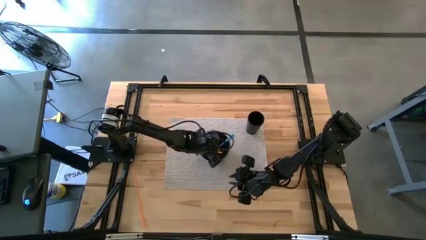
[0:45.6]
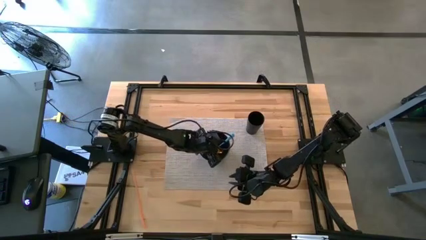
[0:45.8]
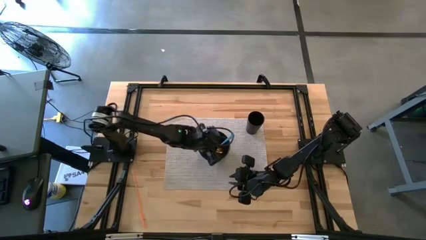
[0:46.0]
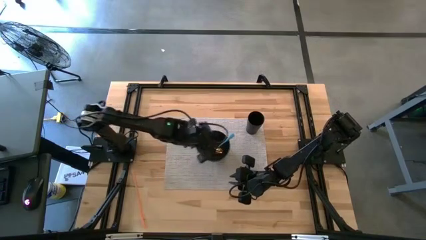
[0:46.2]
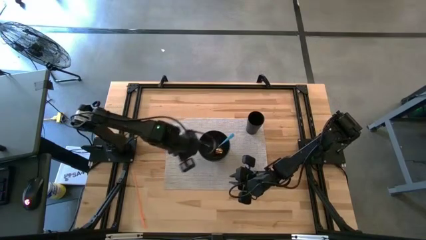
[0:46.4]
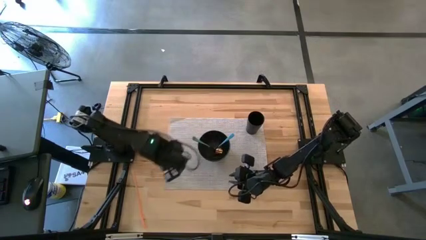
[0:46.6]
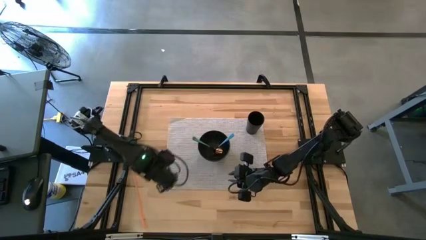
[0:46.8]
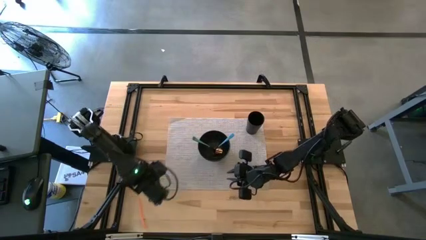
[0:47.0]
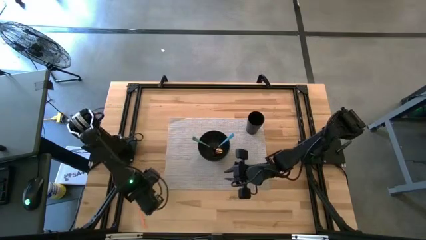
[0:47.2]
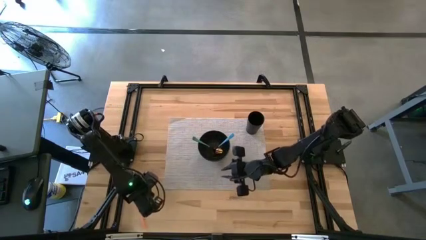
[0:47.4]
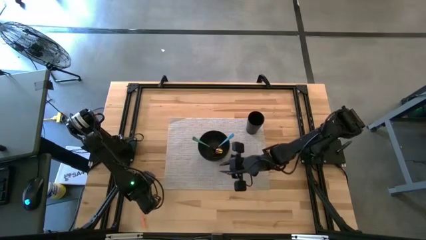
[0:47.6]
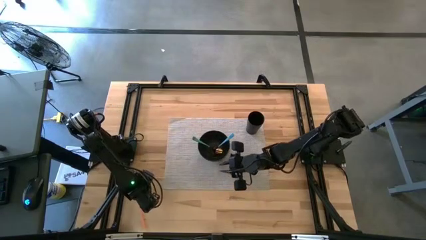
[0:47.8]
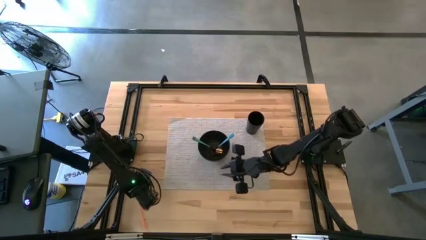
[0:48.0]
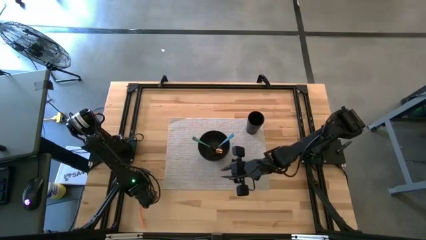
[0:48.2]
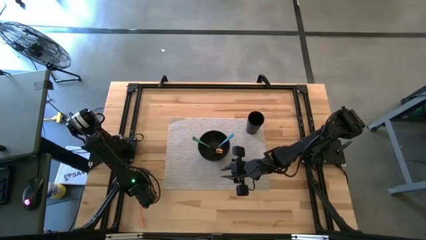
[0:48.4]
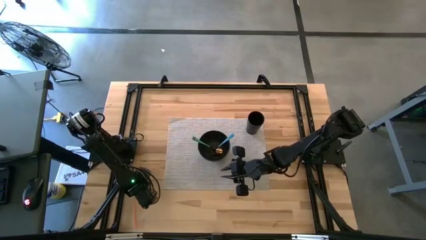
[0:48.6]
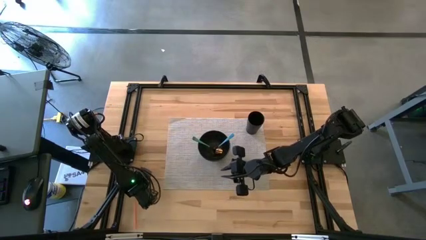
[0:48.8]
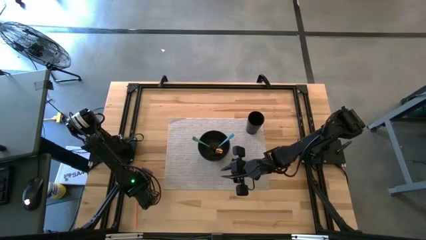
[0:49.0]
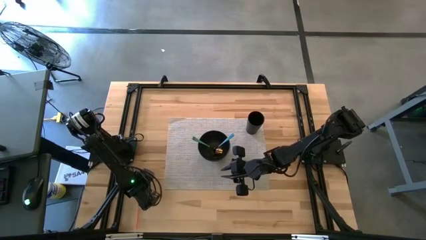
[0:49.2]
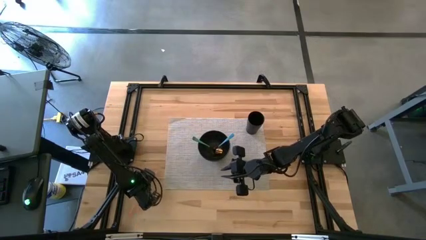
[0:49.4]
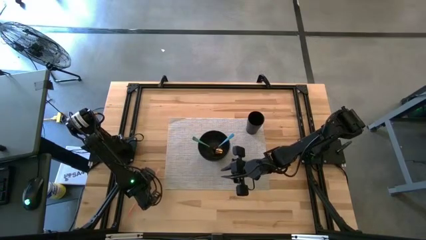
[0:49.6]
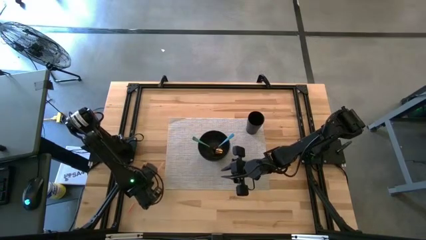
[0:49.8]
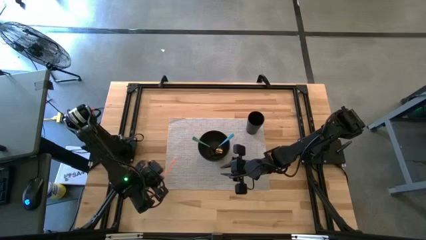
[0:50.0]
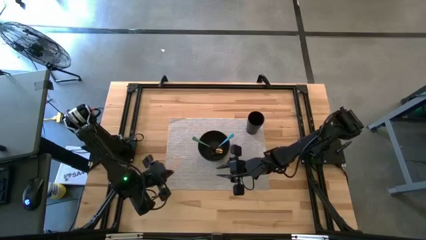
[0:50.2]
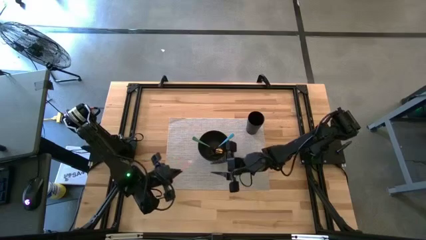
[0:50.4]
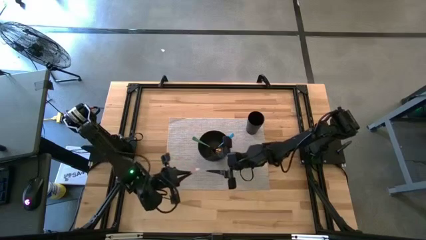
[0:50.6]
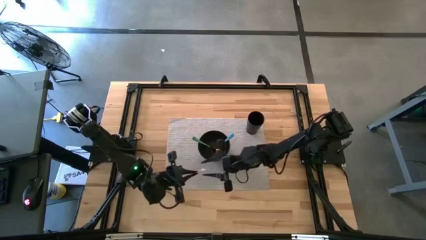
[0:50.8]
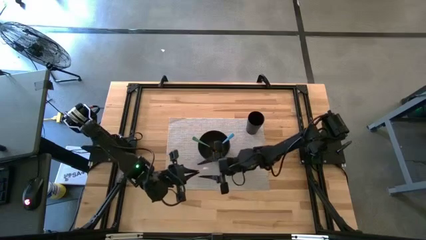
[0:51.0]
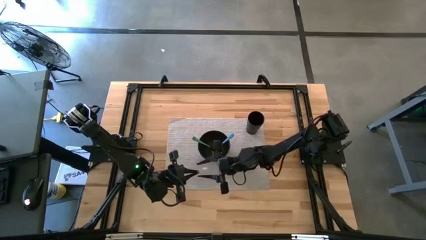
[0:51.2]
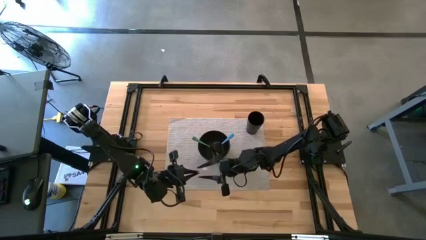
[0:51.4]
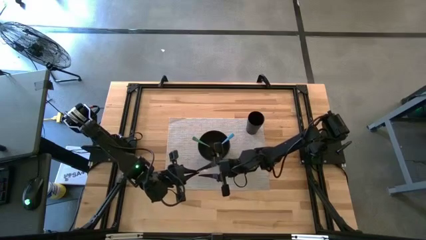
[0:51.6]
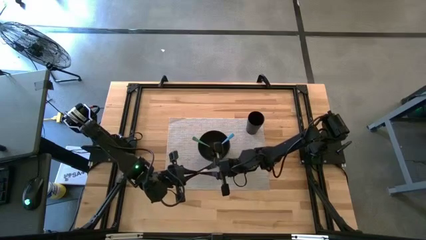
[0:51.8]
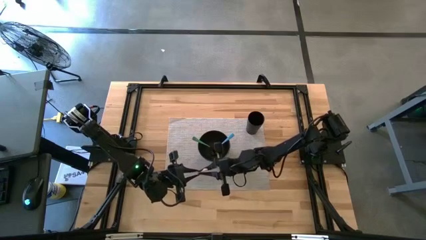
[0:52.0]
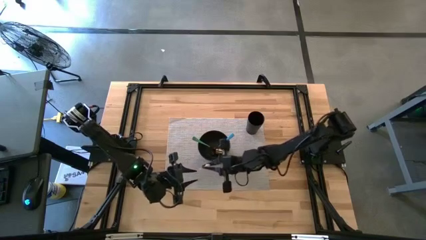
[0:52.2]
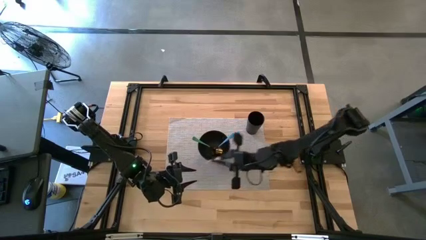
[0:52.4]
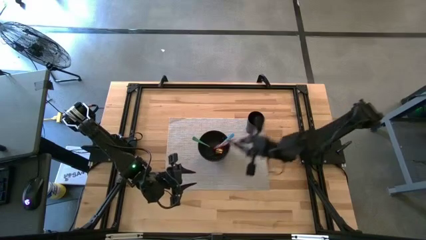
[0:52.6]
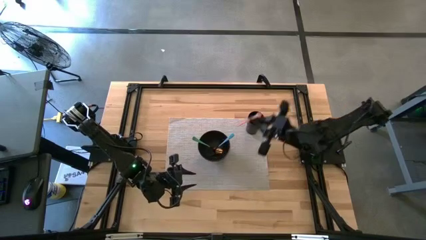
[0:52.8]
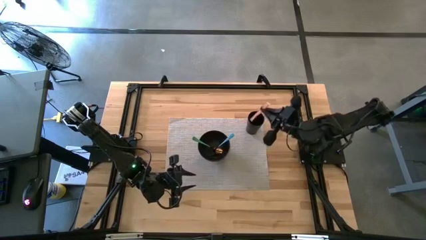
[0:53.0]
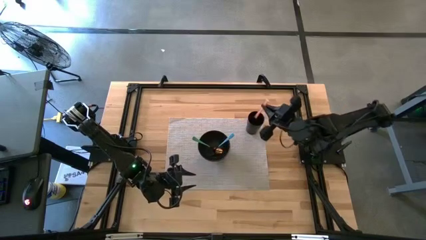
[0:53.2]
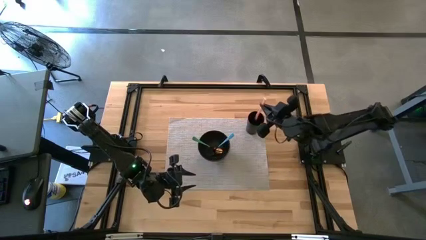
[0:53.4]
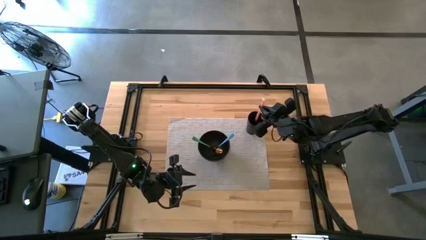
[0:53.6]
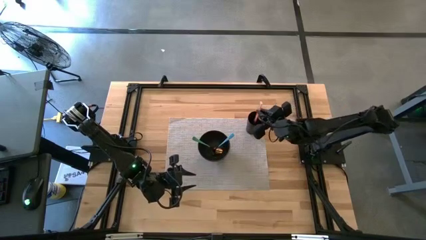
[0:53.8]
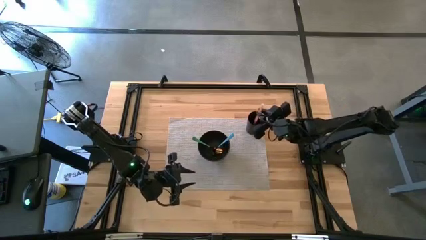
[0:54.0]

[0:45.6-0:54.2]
Task: Pick & Place Utensil
Put the orange straw into the black cup on the gray mat

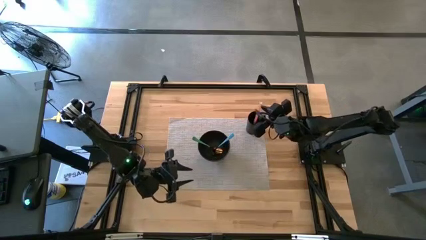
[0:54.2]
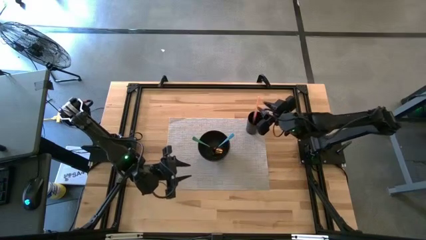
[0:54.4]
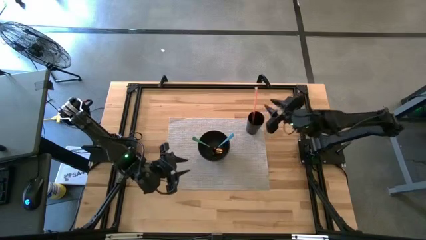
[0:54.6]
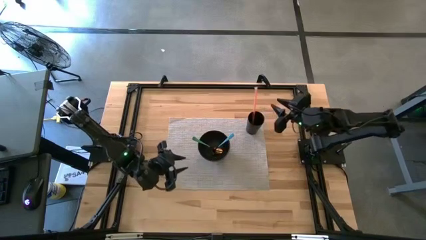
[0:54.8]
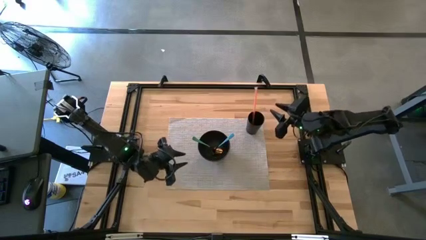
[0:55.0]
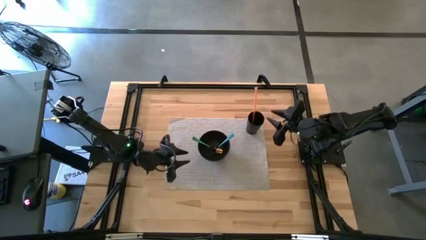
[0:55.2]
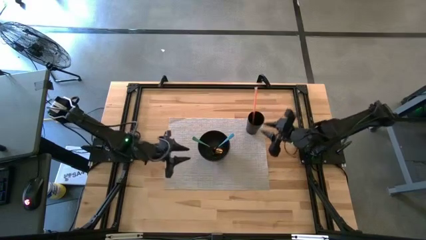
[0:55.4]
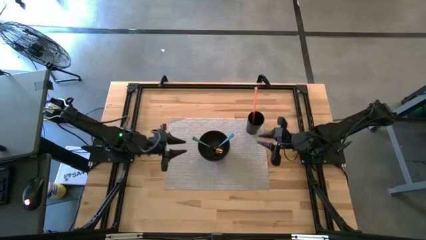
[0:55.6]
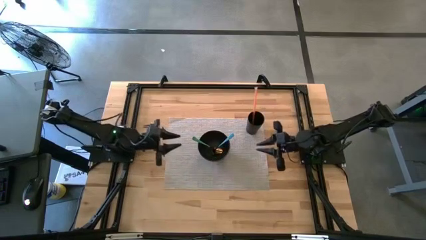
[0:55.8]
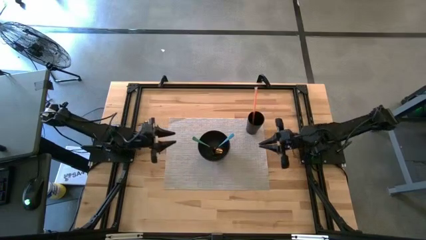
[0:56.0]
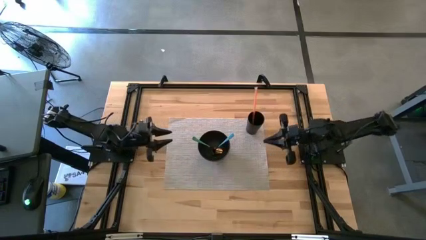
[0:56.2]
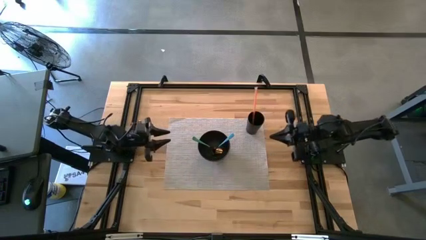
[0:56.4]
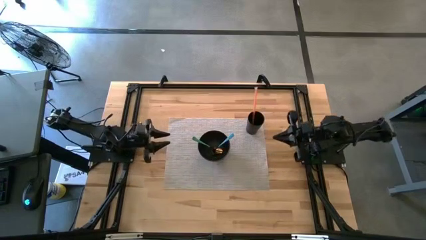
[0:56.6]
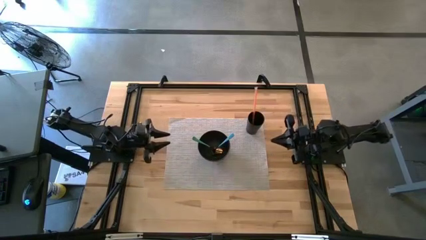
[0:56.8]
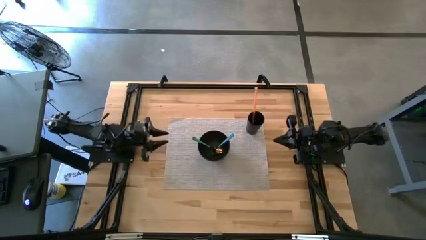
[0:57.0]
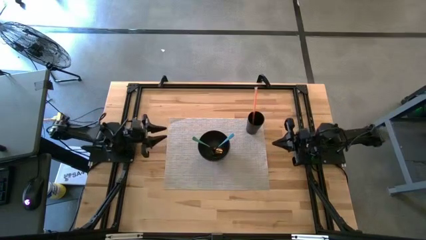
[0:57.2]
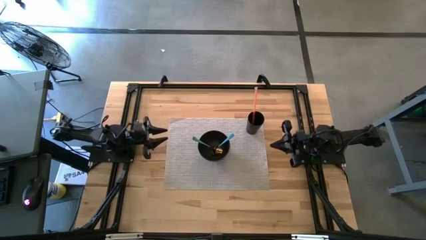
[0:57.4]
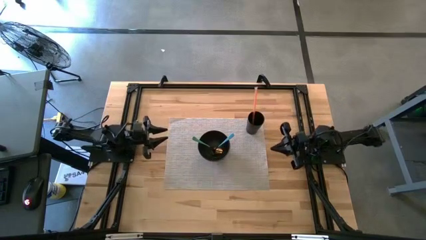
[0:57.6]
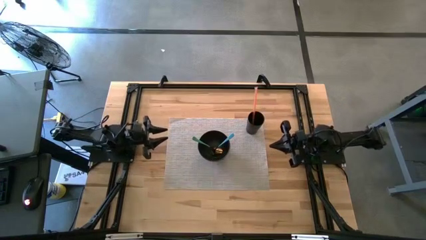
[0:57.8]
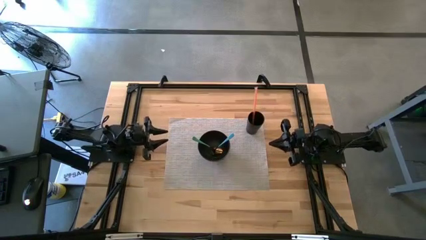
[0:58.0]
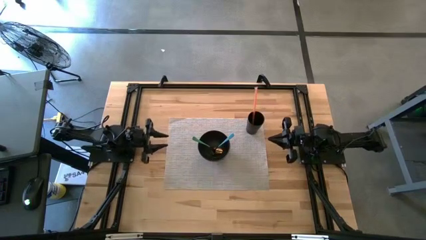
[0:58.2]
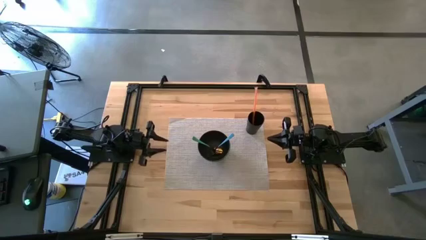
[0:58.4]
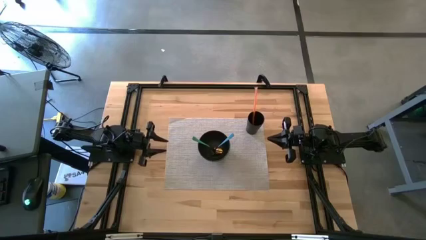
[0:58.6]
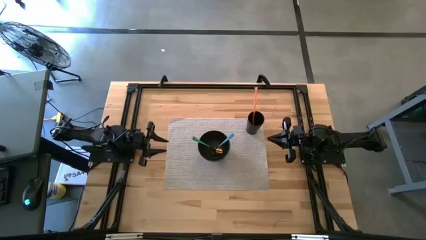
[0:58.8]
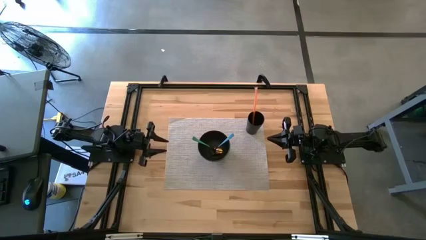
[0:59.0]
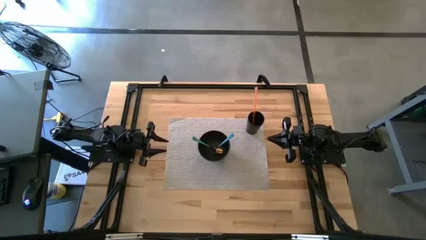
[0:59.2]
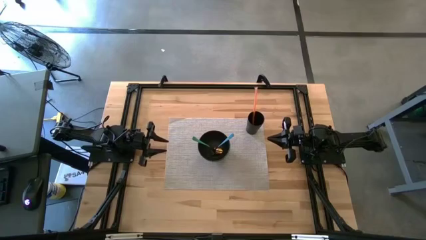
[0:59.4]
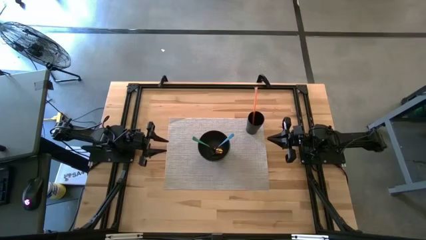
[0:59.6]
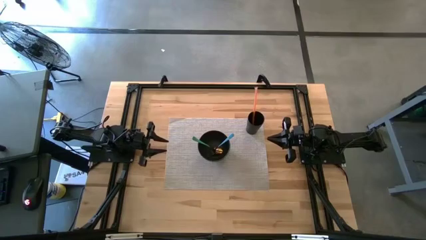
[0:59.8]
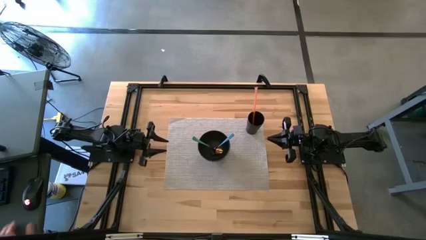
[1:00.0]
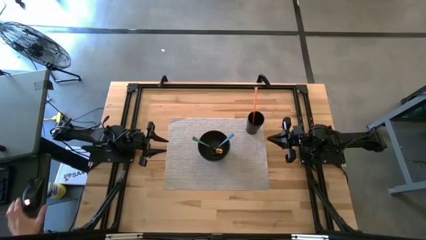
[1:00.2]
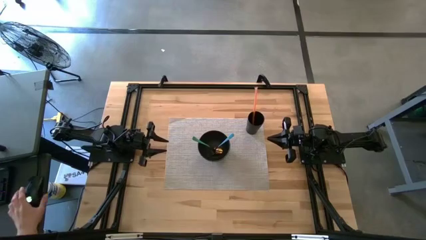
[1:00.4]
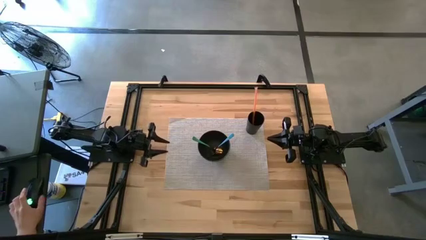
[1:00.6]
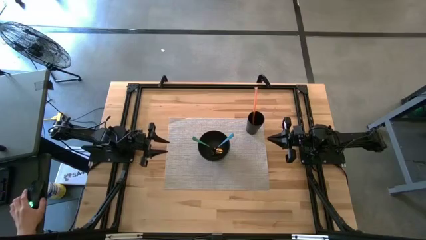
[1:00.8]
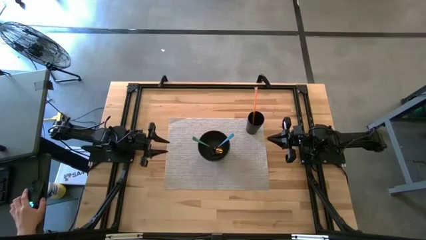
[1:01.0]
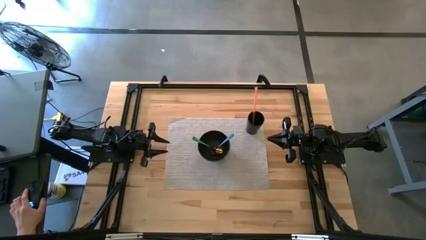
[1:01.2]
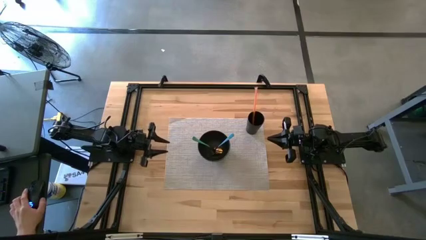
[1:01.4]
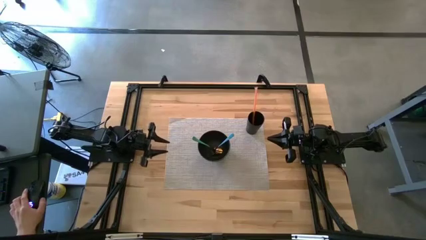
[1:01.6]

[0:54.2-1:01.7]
Return to Home Position
